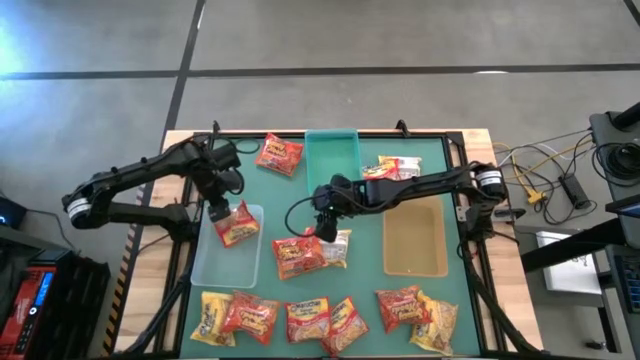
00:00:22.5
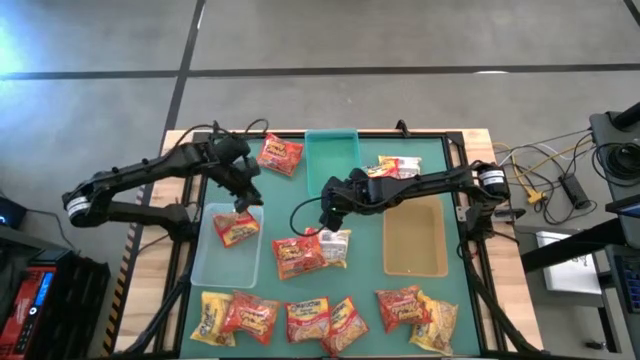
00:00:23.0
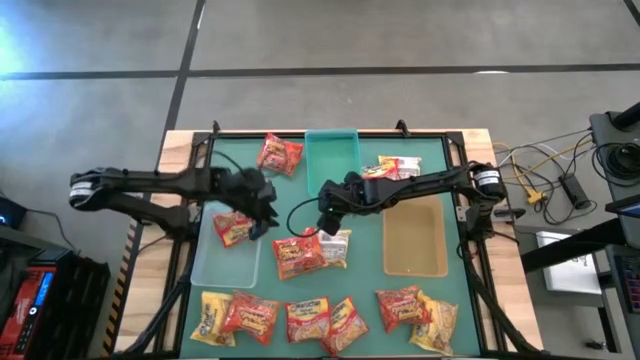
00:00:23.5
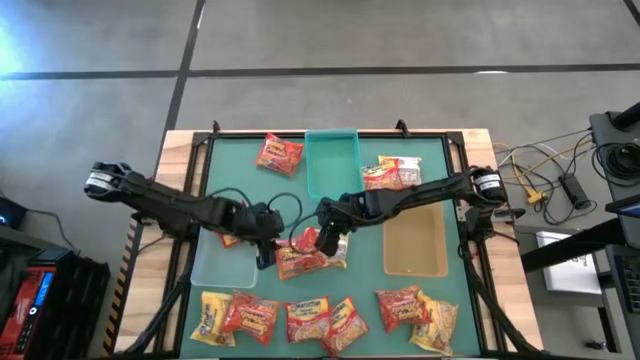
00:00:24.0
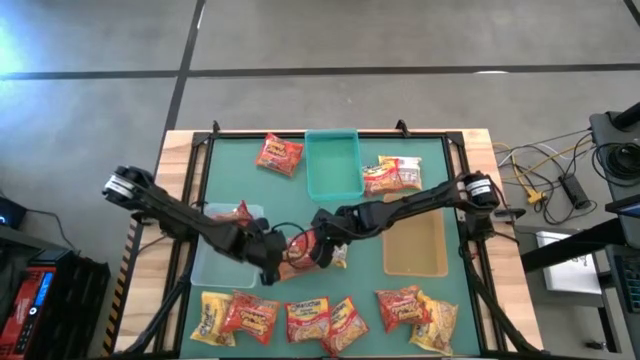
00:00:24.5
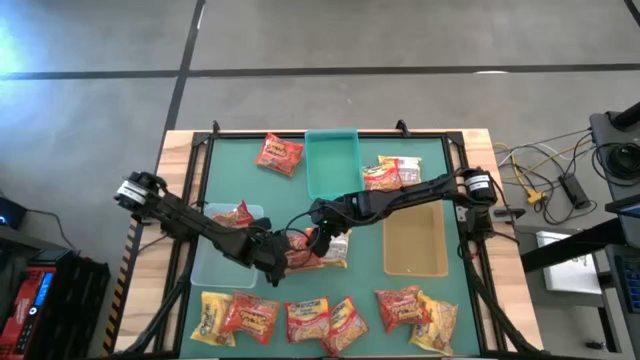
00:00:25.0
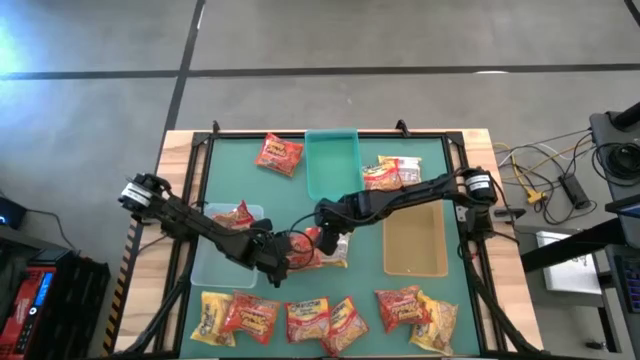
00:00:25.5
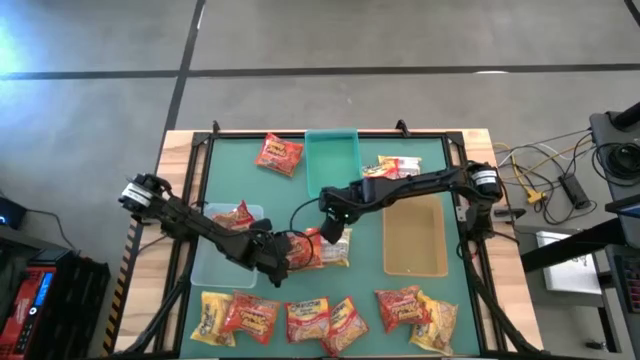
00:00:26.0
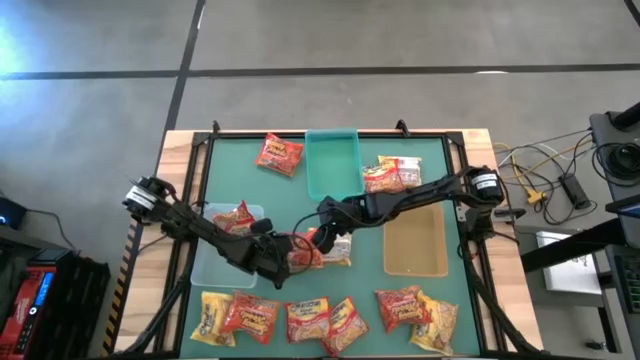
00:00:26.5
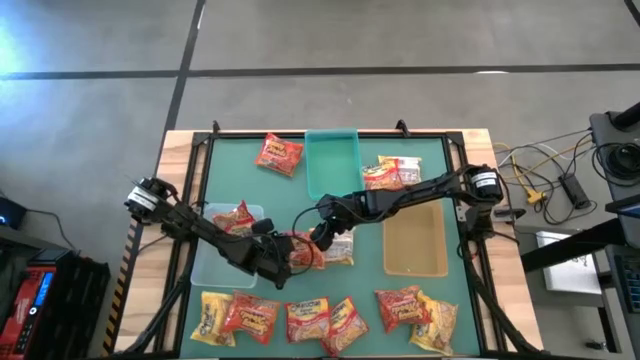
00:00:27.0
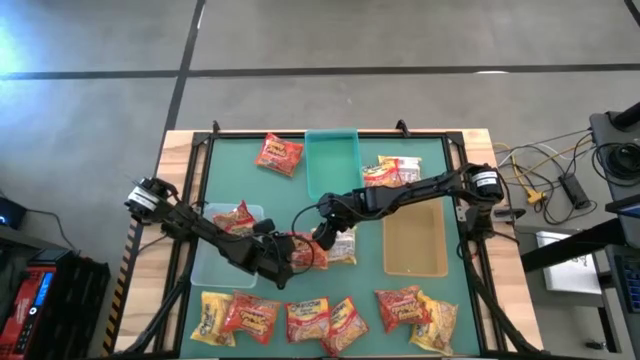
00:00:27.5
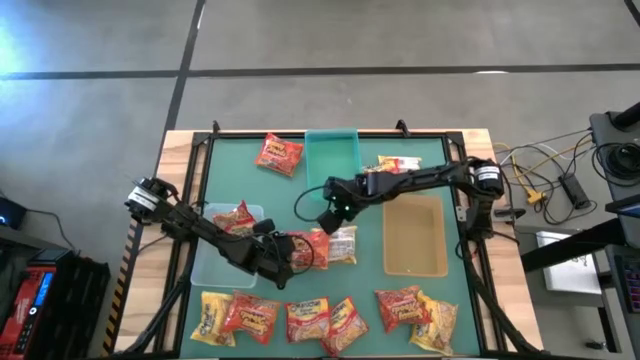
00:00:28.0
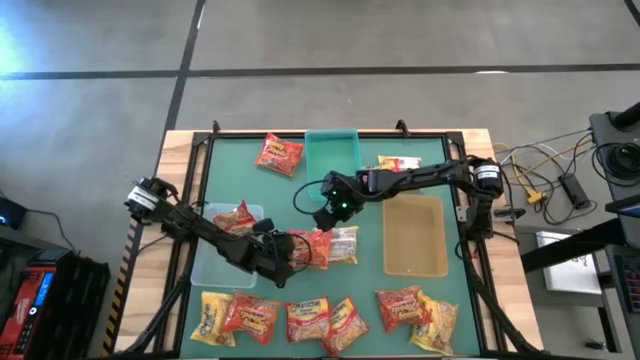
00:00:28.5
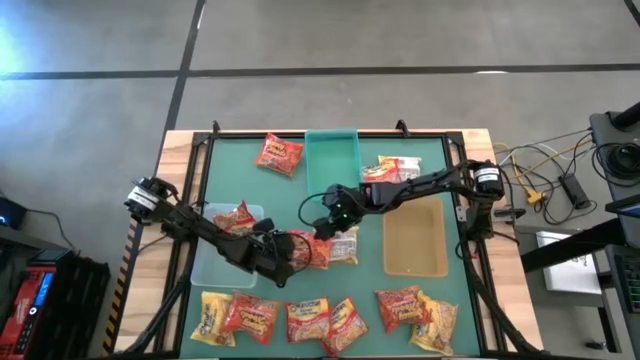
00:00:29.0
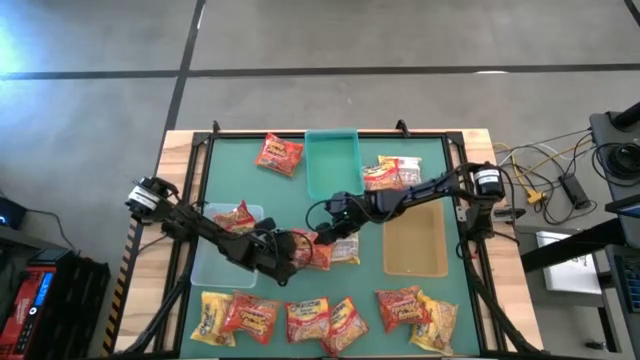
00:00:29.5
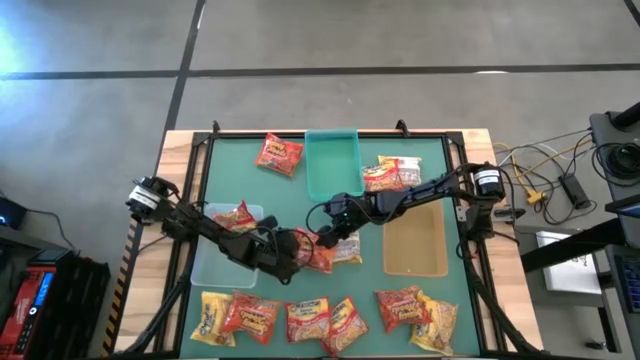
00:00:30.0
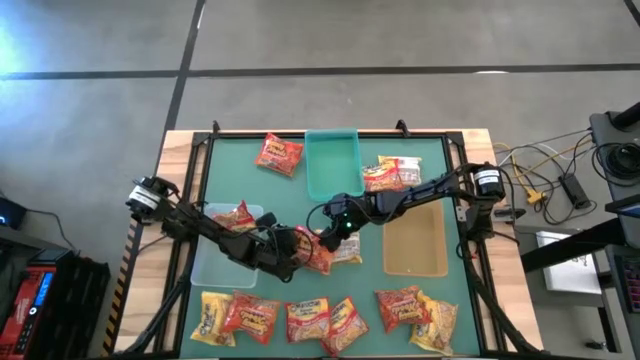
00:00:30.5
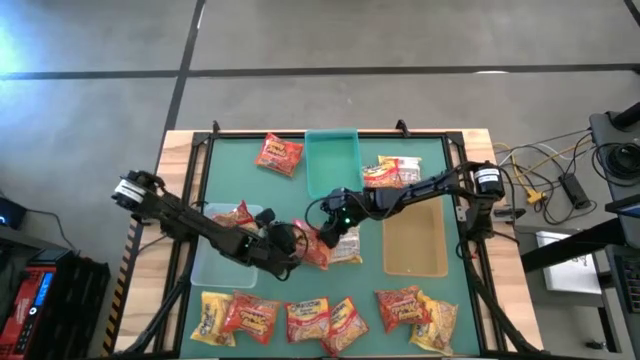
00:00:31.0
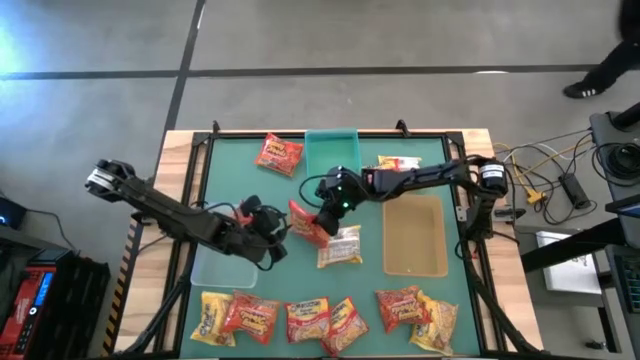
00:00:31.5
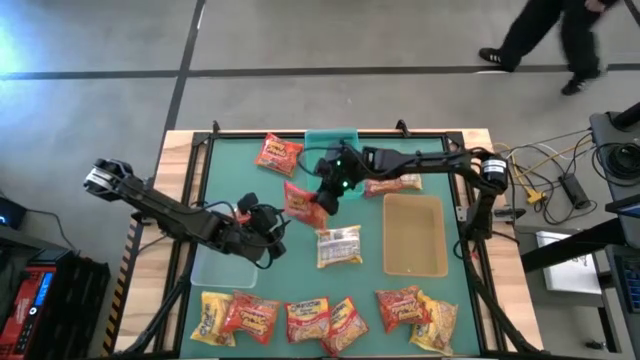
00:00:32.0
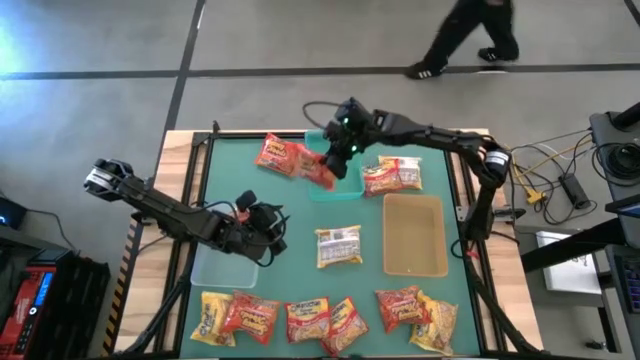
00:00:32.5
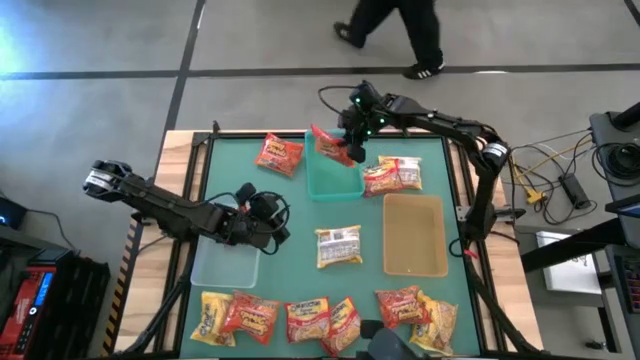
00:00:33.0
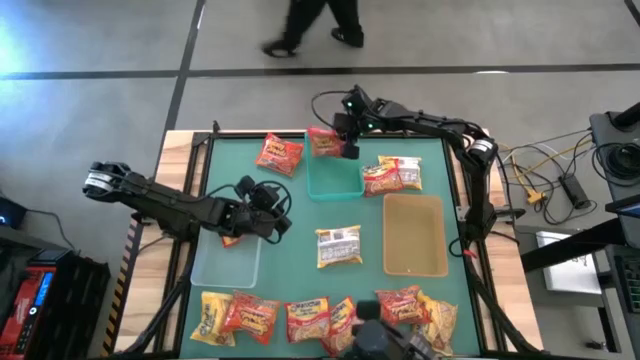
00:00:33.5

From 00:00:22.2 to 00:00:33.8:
Task: Sort Maruchan noodles
Put the orange noodle pack into the blue bin

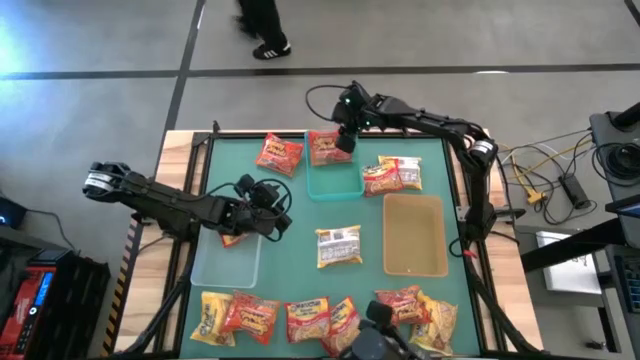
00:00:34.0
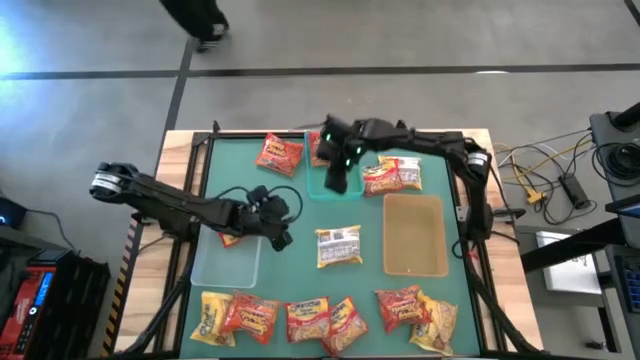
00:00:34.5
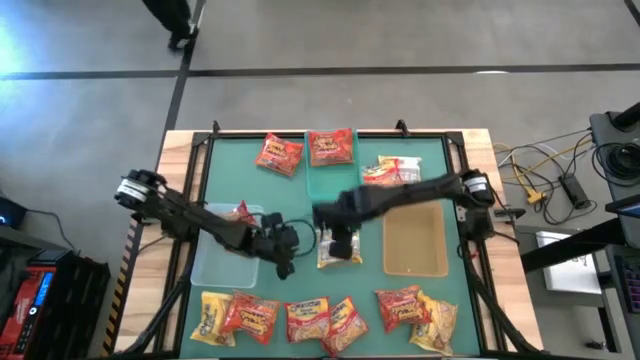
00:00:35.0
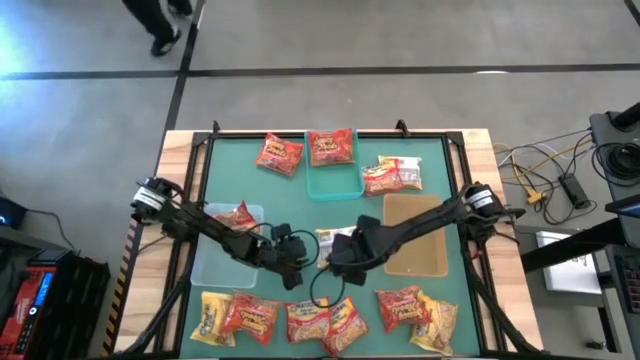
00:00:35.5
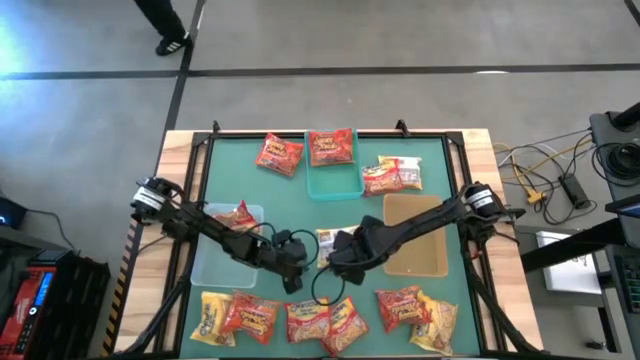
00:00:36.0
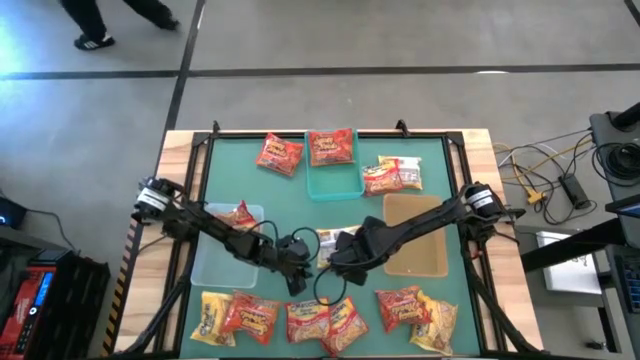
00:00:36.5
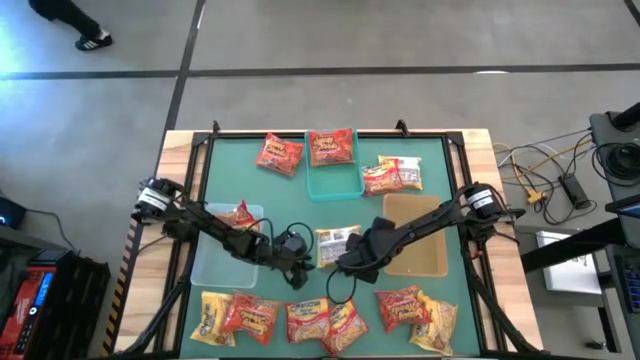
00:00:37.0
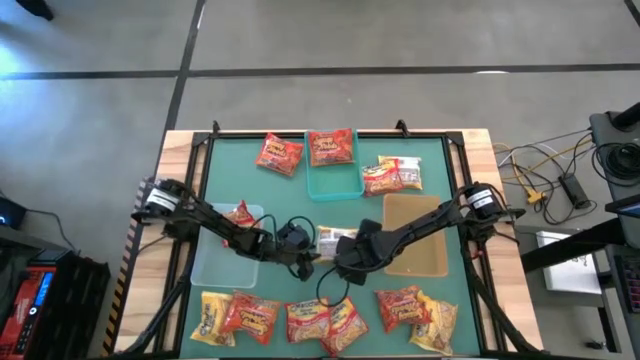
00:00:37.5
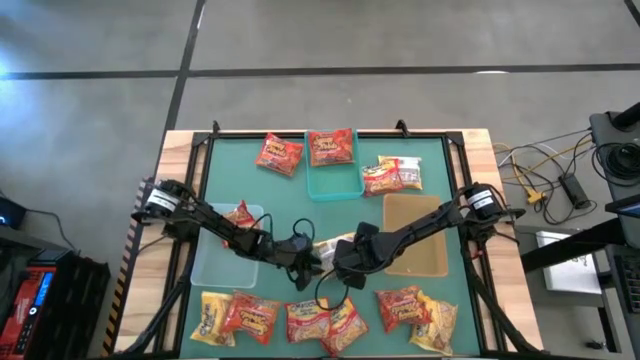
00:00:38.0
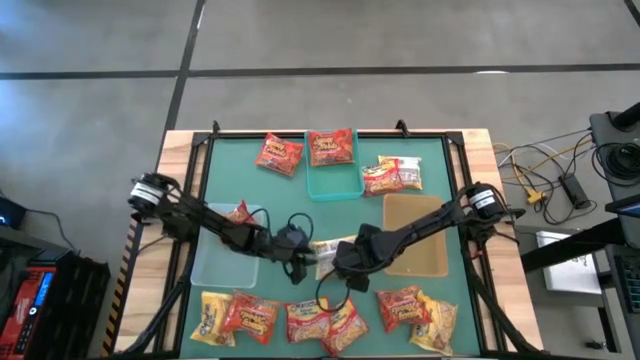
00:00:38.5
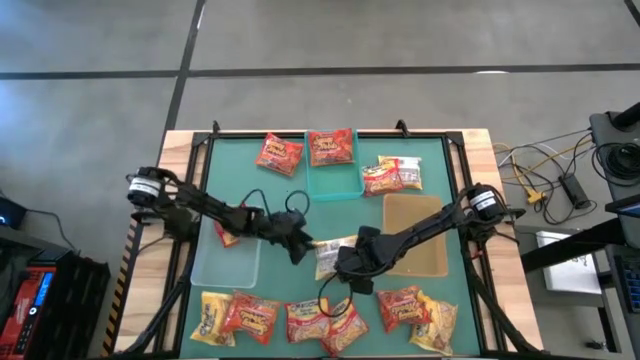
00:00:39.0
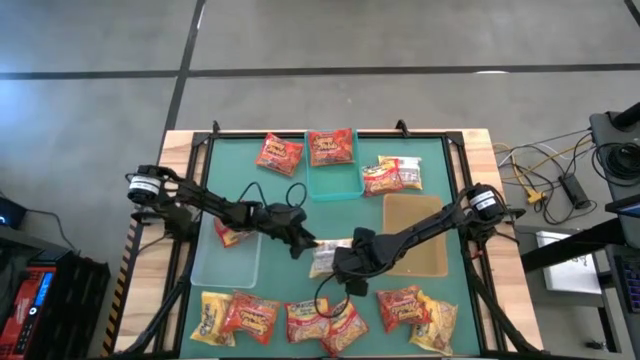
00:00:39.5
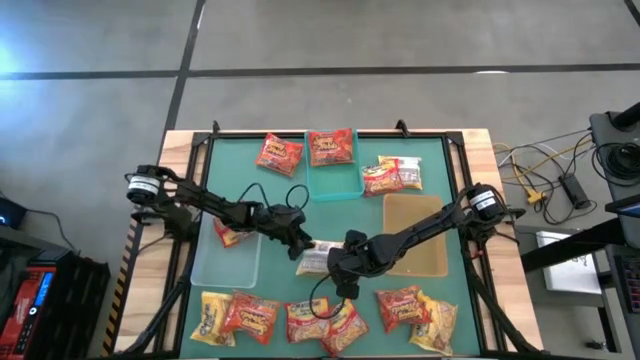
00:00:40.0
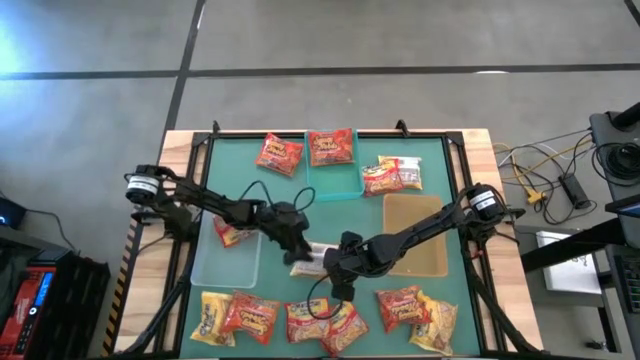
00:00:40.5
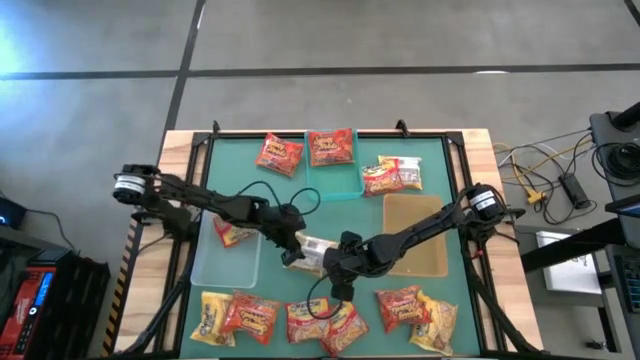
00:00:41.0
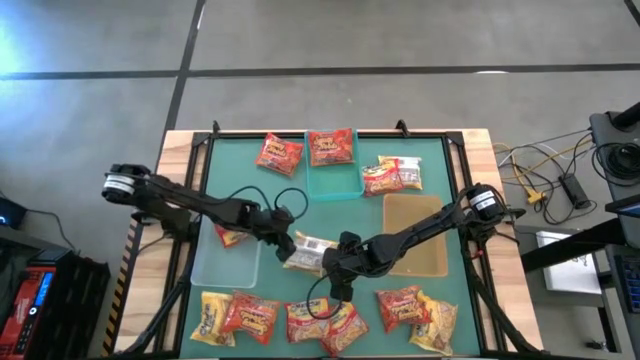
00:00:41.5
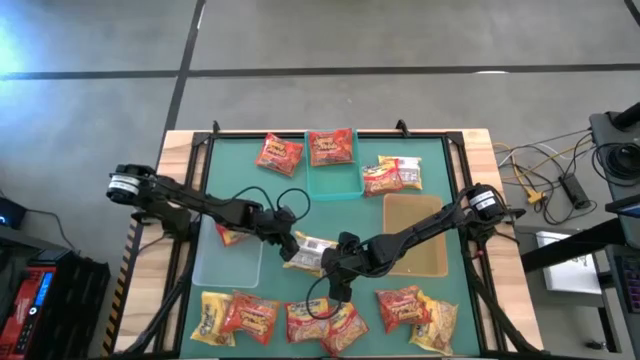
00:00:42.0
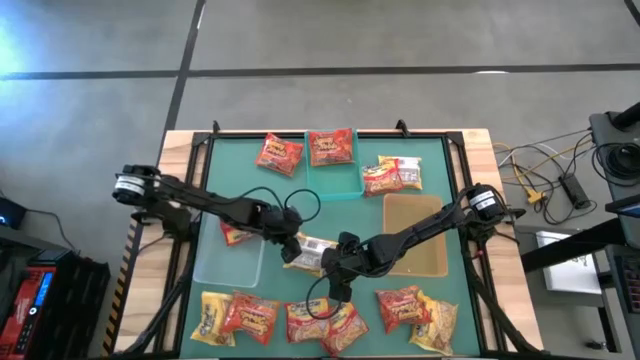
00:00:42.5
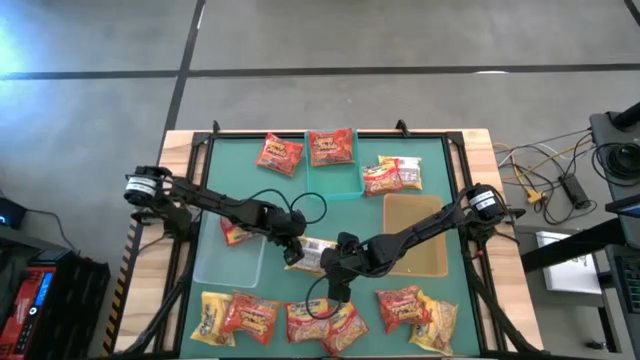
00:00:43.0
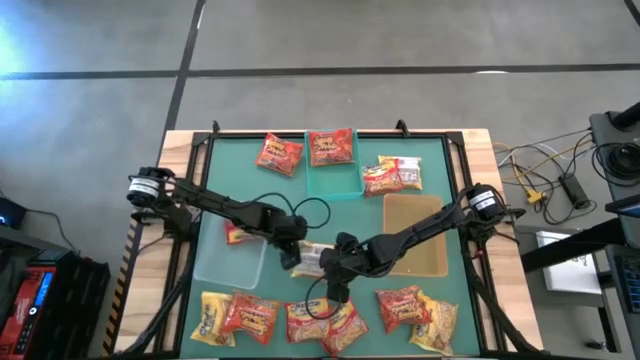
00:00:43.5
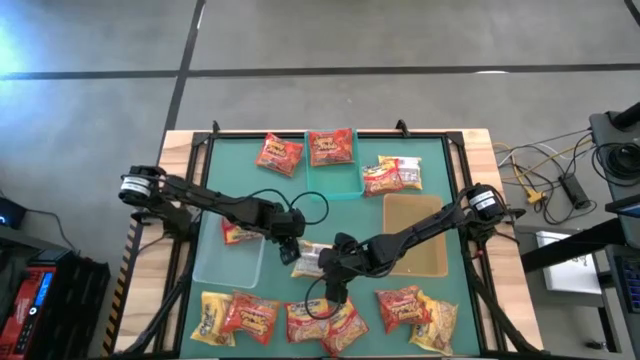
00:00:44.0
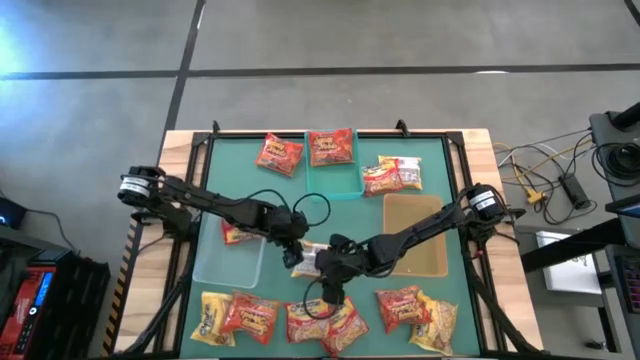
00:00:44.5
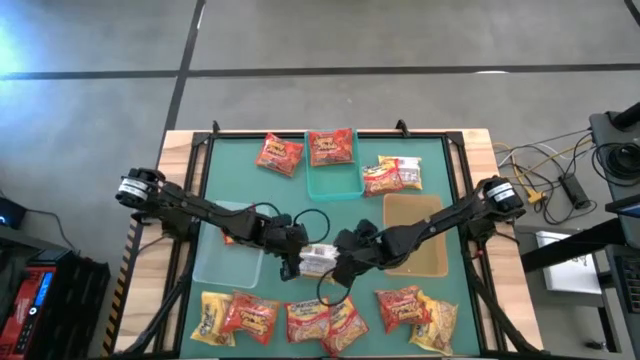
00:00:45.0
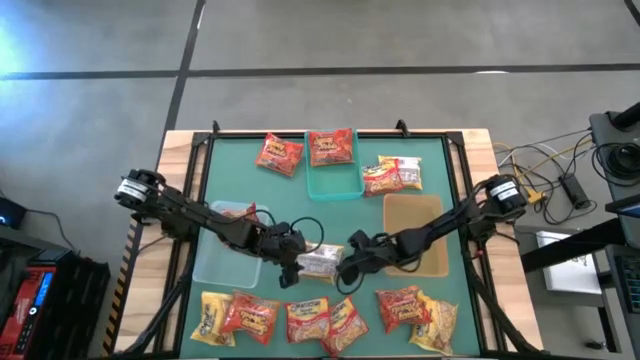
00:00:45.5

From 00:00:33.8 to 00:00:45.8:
Put the yellow noodle pack into the yellow bin
